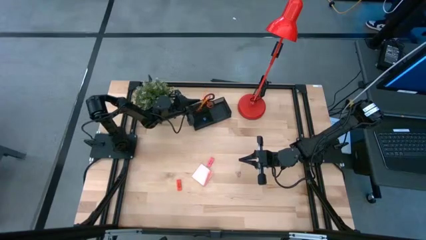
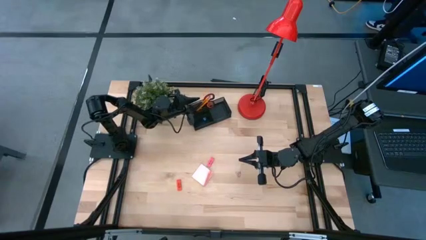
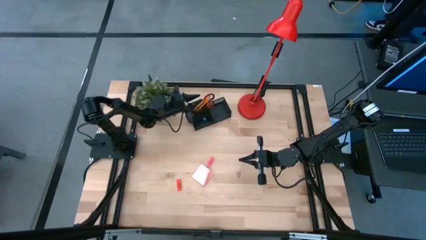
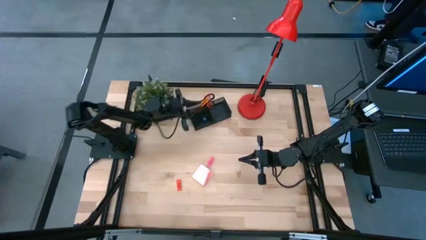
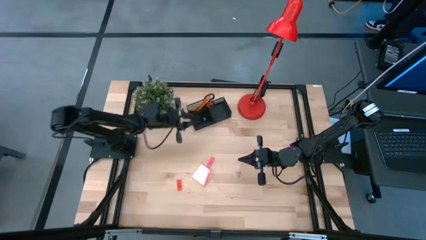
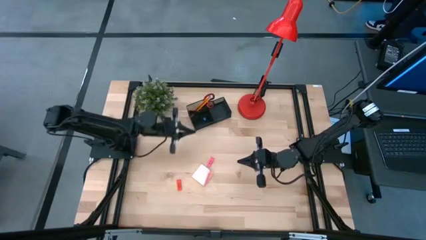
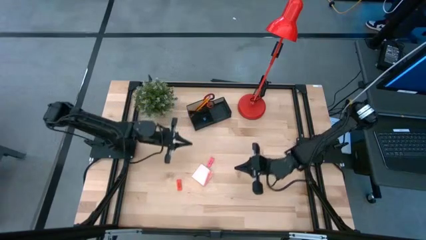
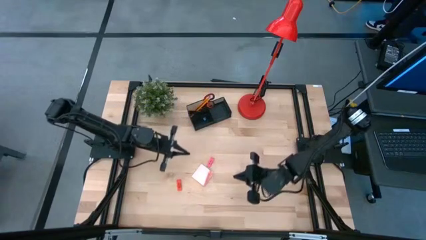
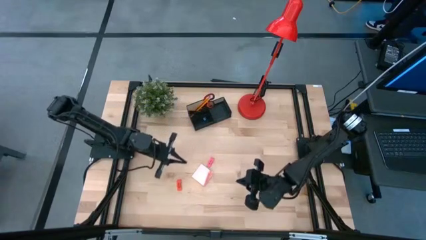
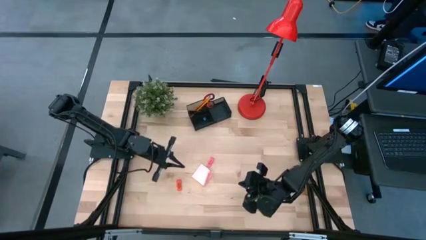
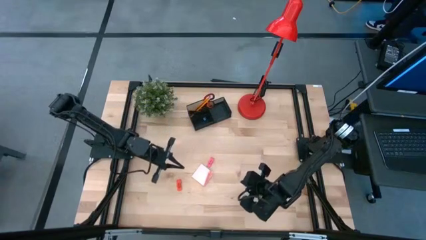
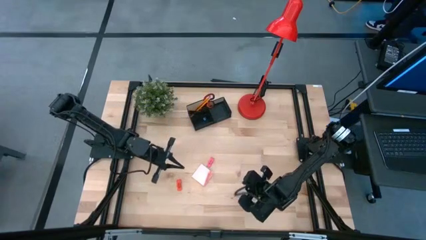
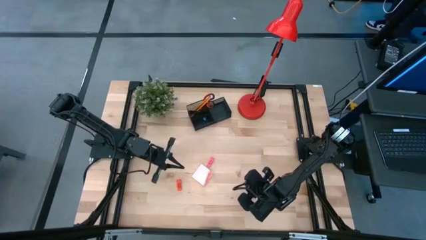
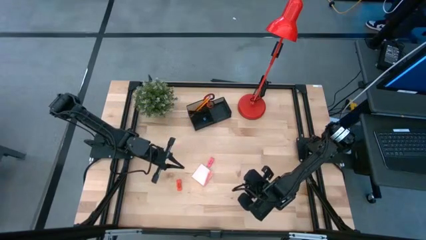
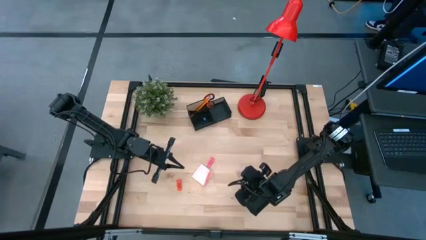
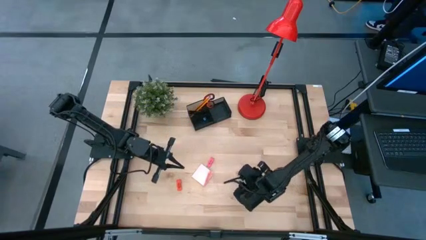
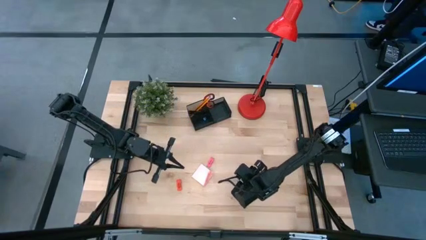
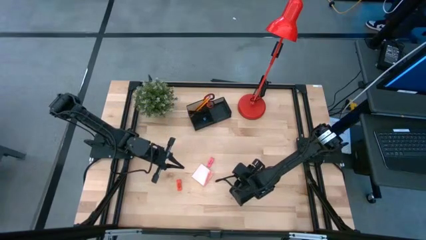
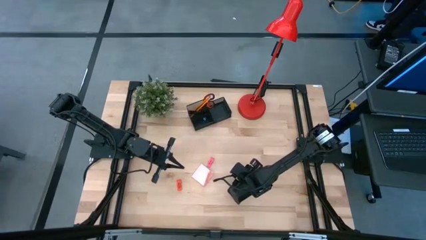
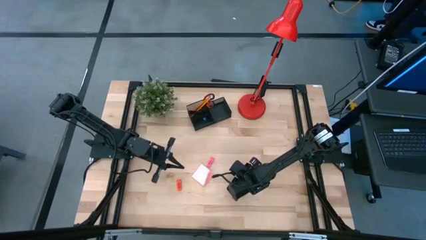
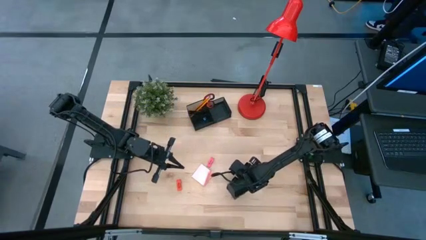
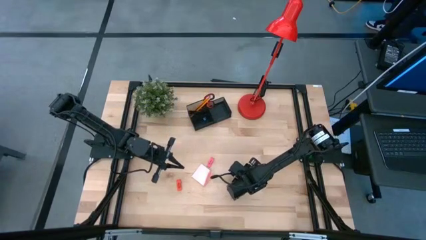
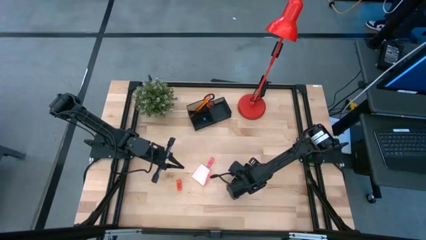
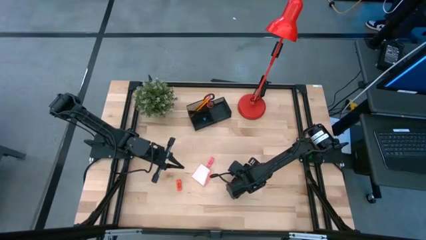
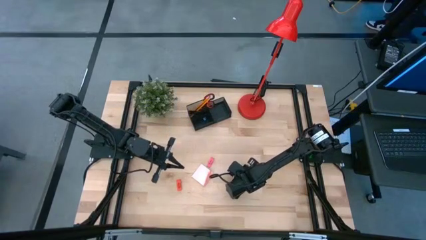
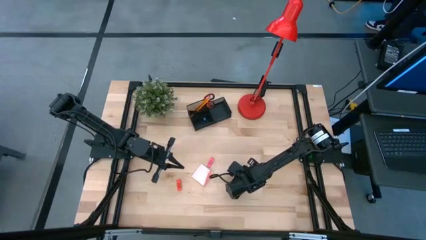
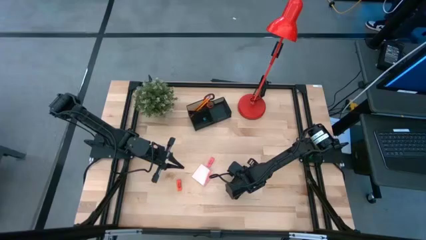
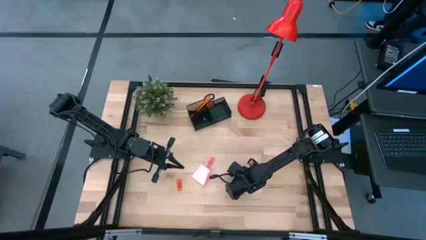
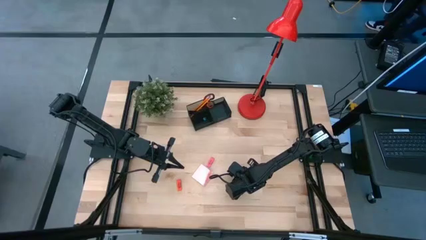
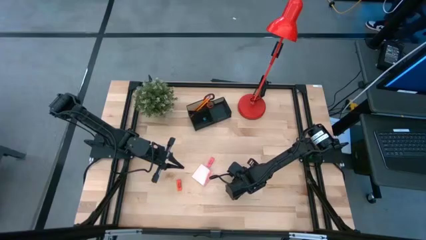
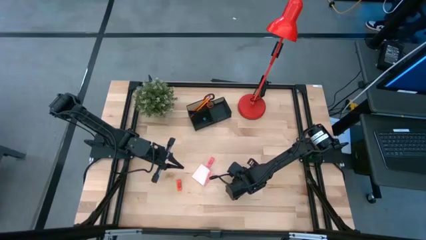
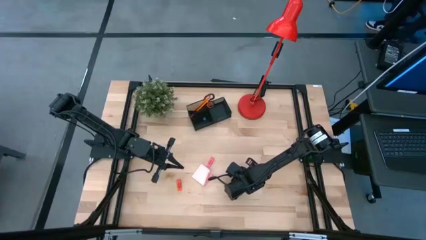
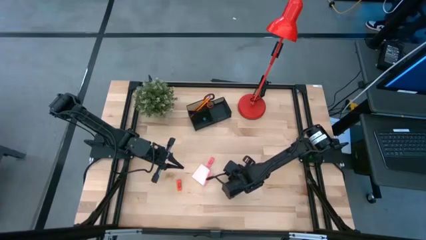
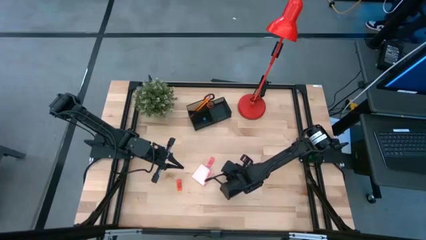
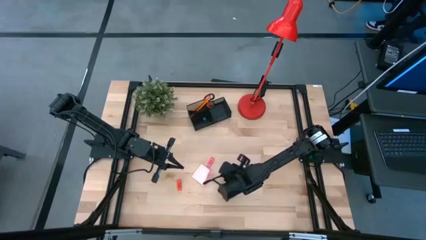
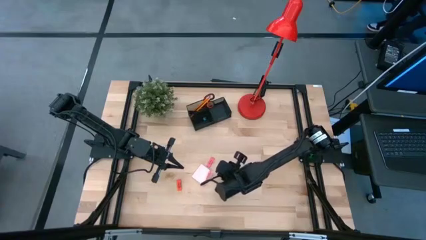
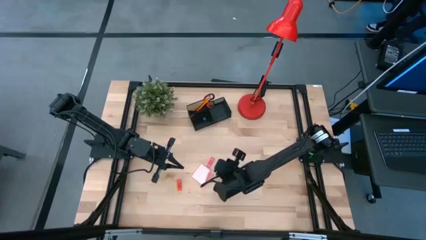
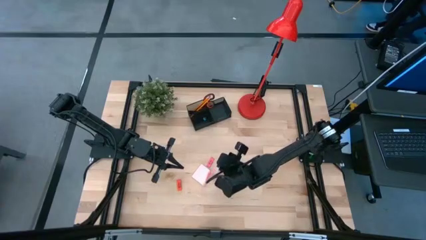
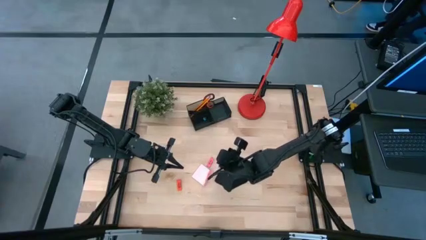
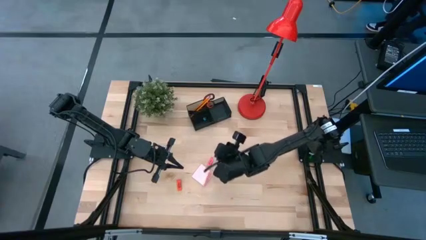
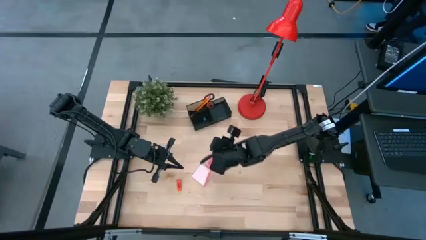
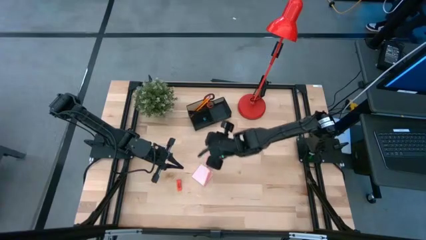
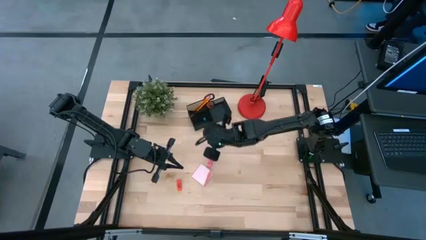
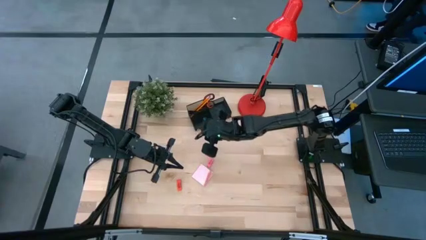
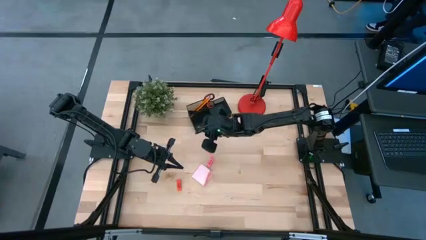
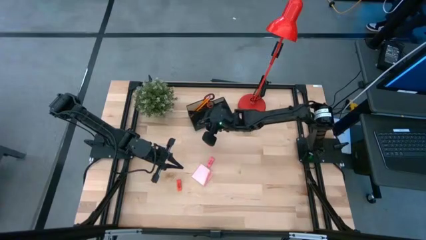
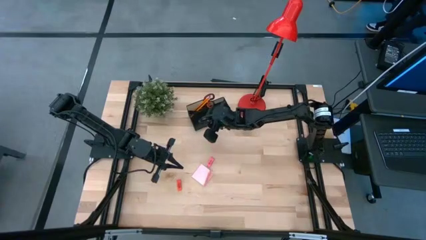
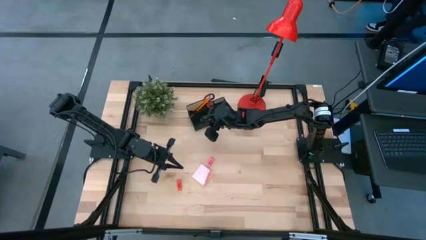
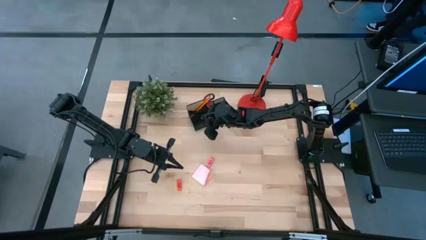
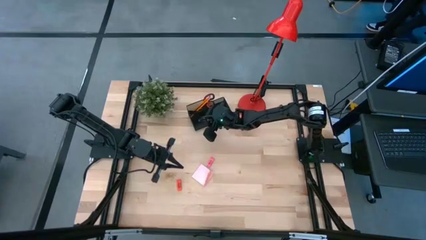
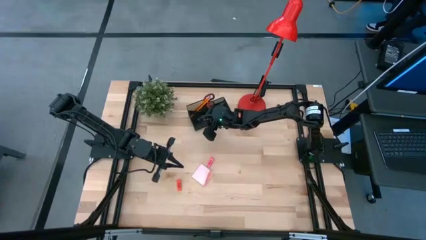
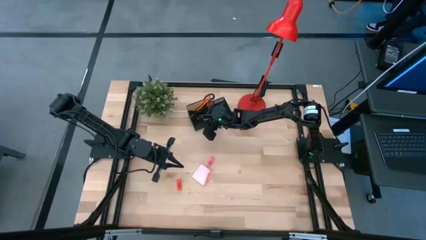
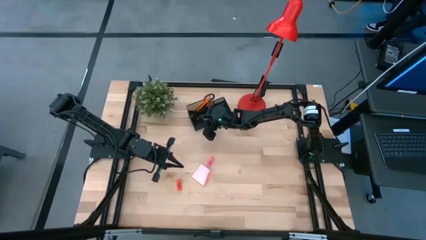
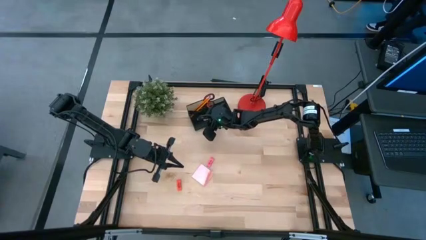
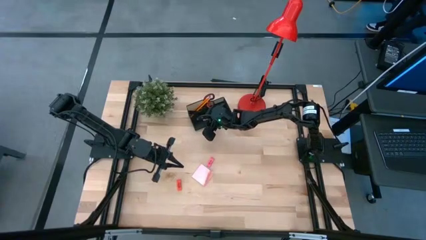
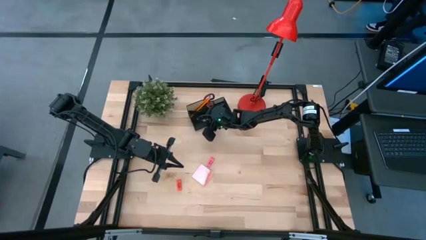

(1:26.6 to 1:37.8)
Task: Pick and place office supplies into organizer
Put the pink binder clip into the black desk organizer
